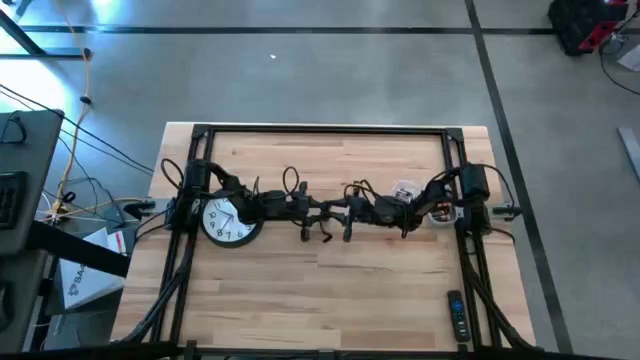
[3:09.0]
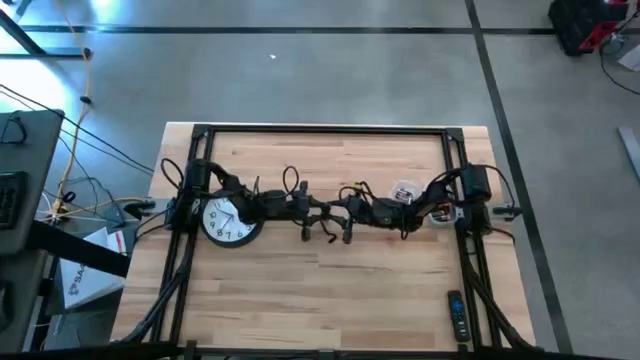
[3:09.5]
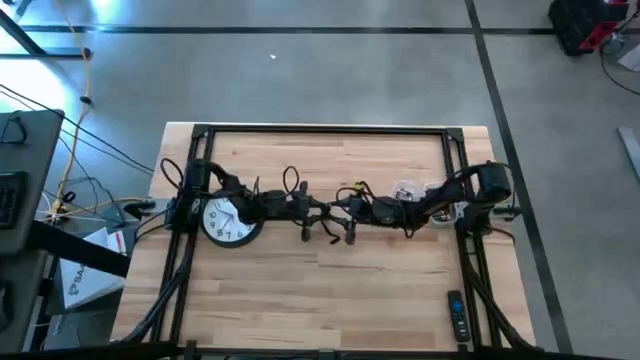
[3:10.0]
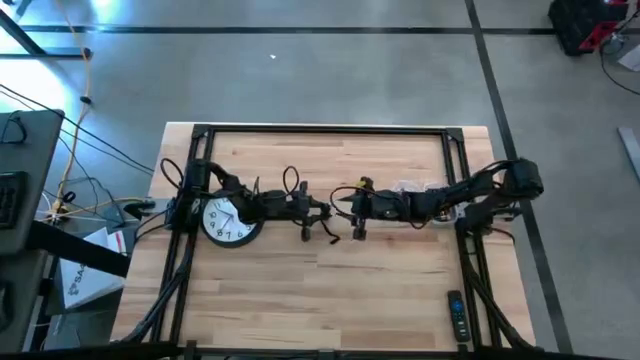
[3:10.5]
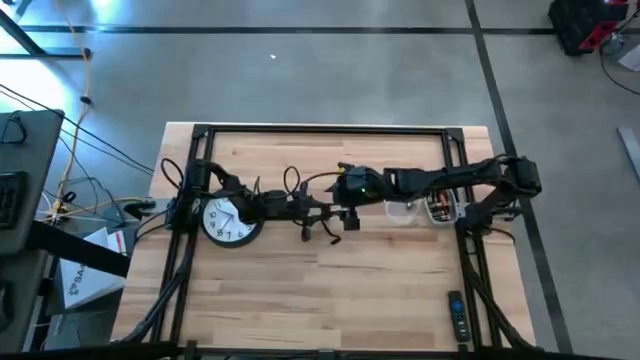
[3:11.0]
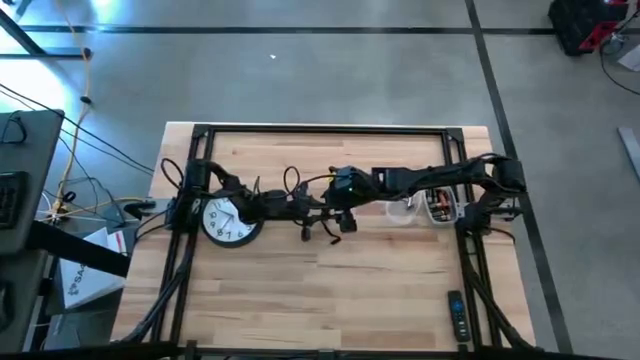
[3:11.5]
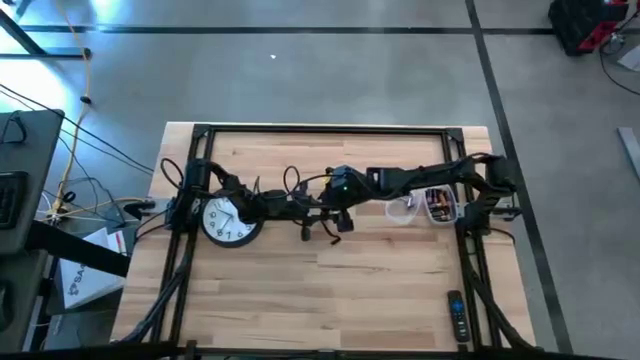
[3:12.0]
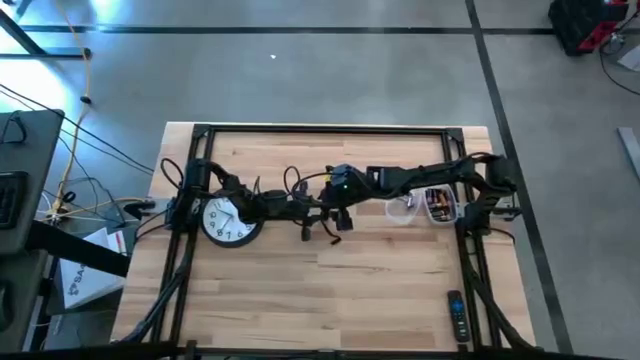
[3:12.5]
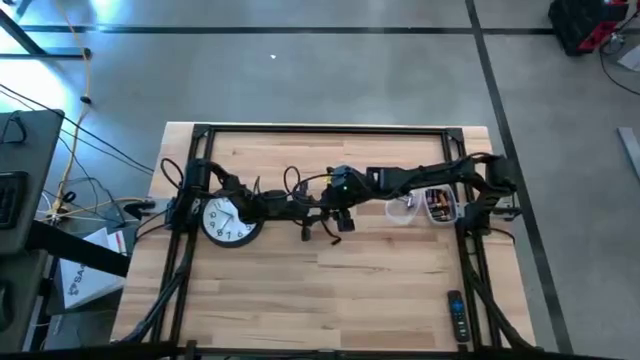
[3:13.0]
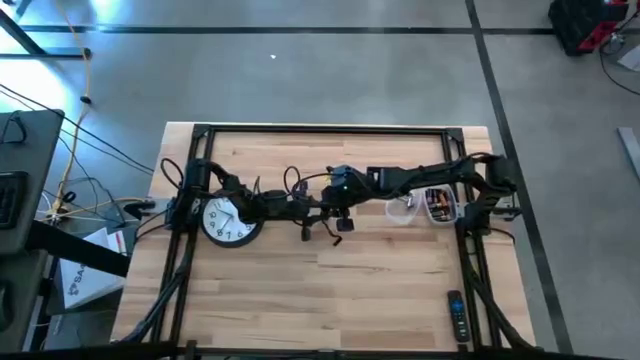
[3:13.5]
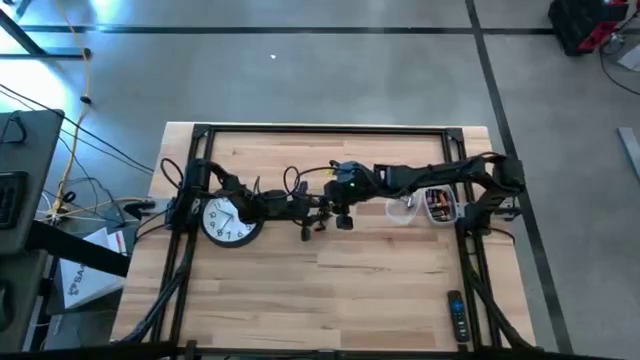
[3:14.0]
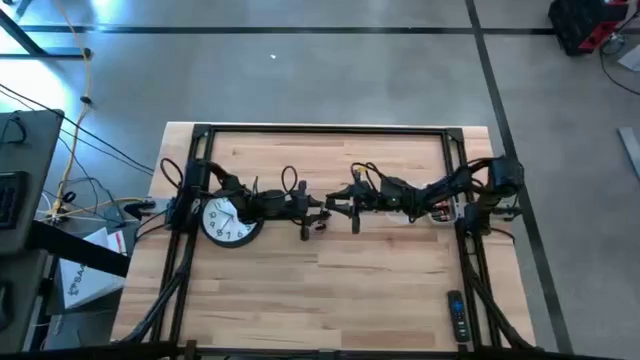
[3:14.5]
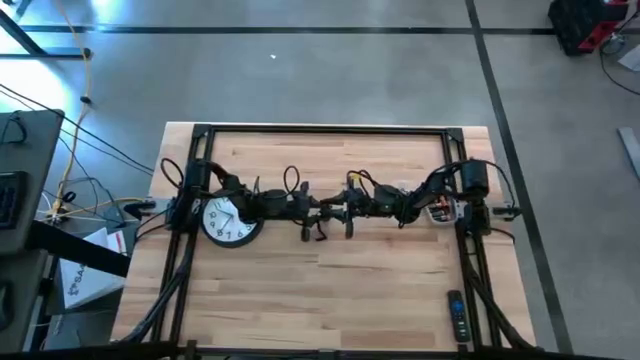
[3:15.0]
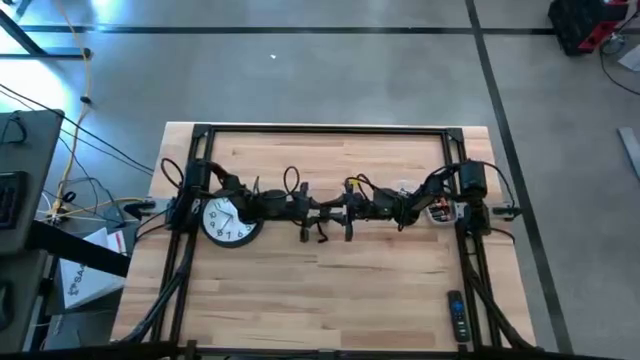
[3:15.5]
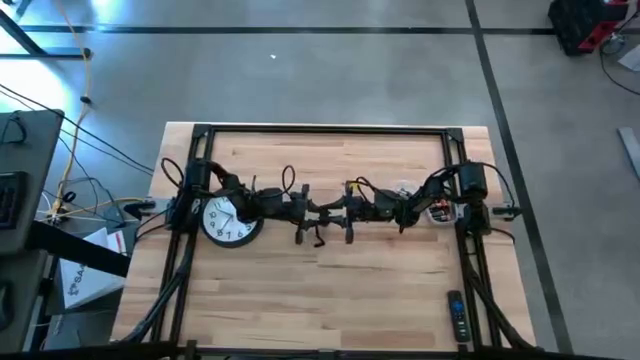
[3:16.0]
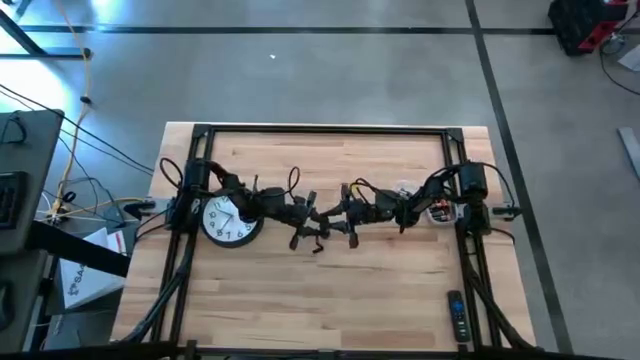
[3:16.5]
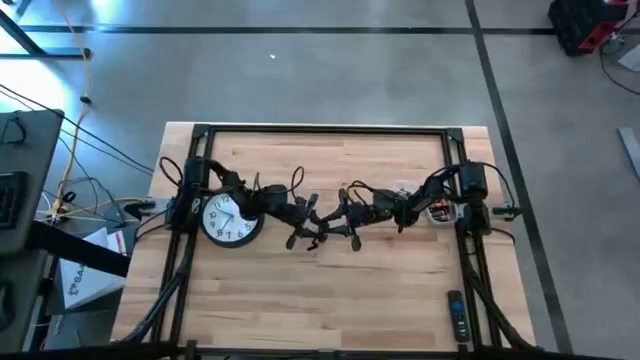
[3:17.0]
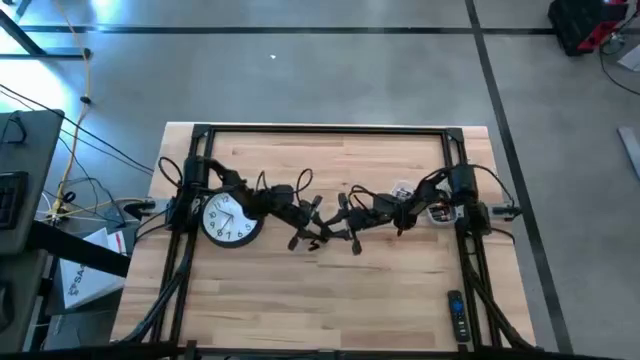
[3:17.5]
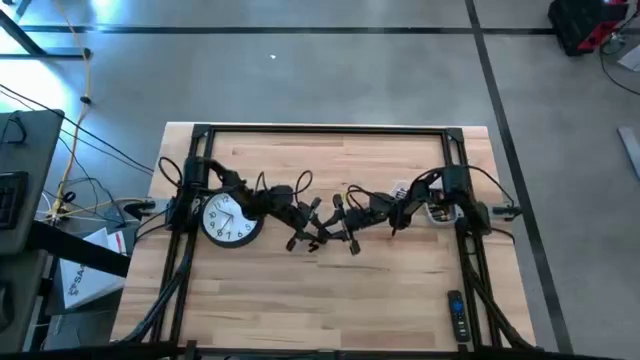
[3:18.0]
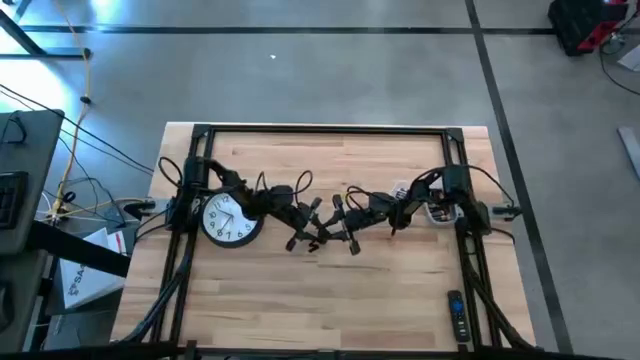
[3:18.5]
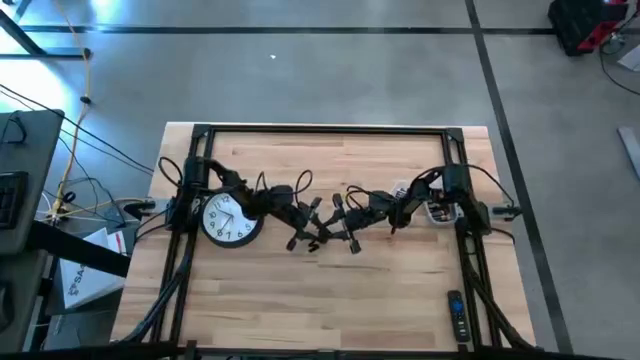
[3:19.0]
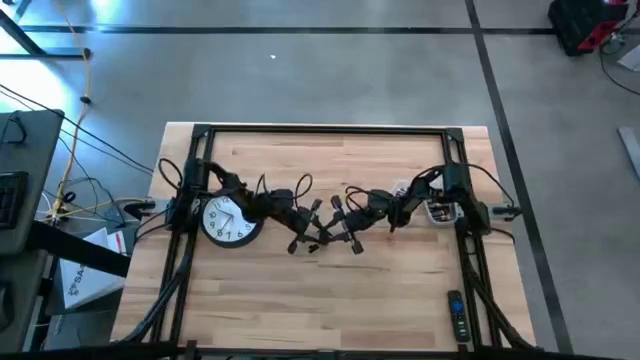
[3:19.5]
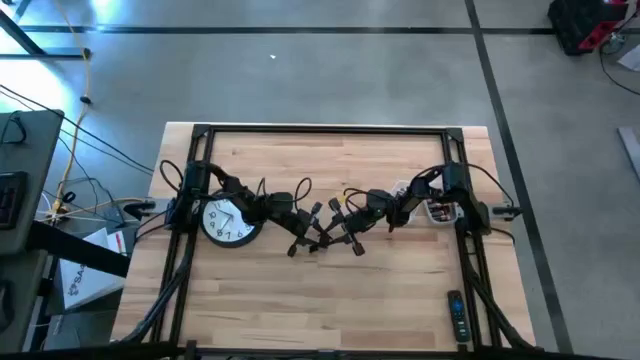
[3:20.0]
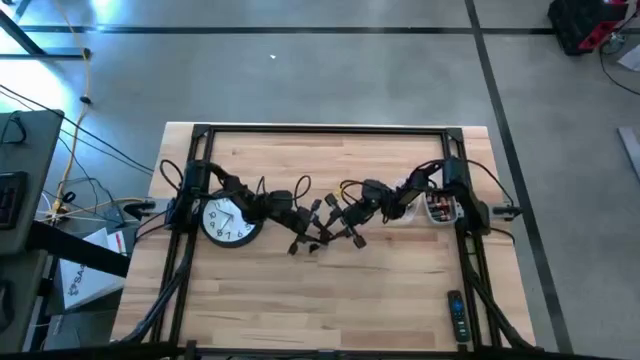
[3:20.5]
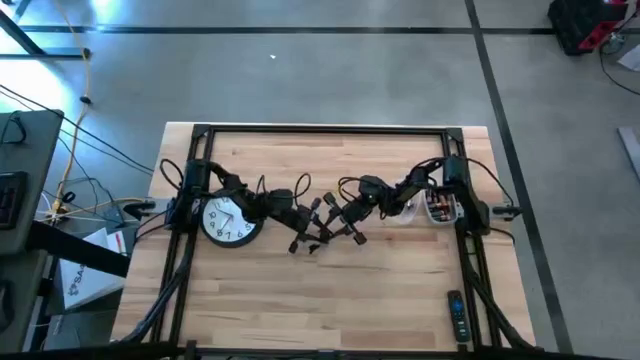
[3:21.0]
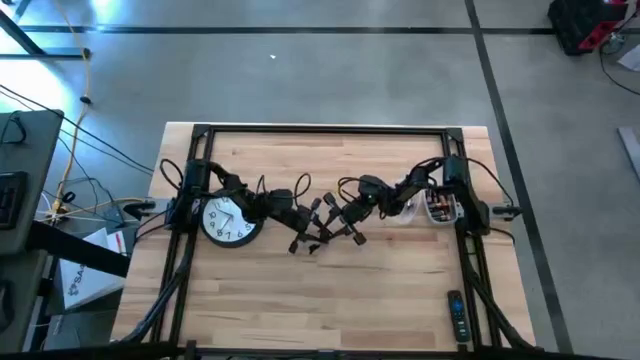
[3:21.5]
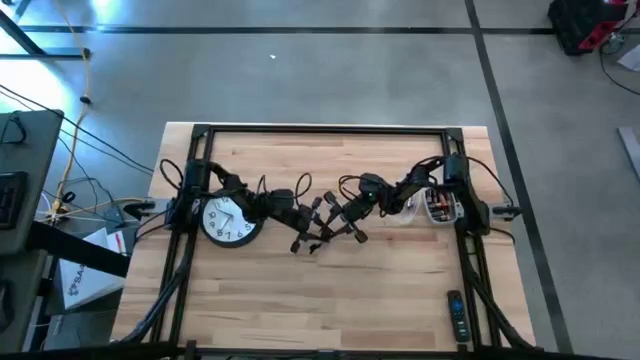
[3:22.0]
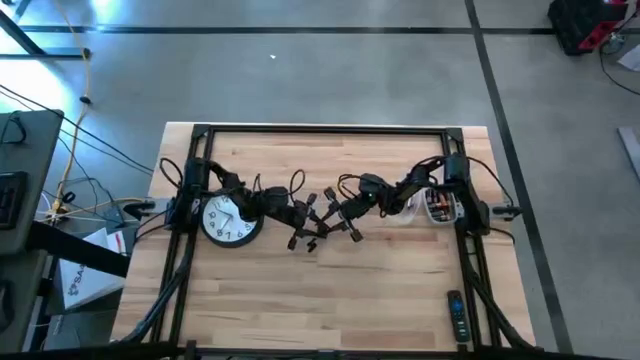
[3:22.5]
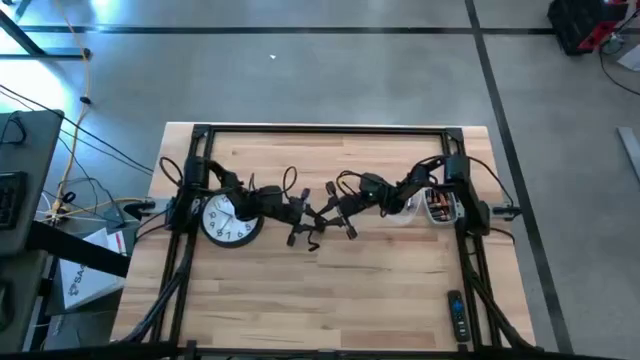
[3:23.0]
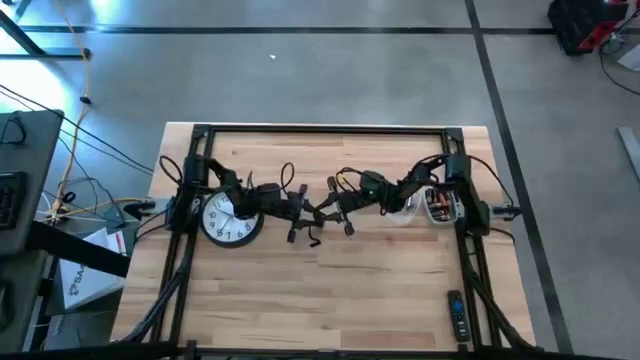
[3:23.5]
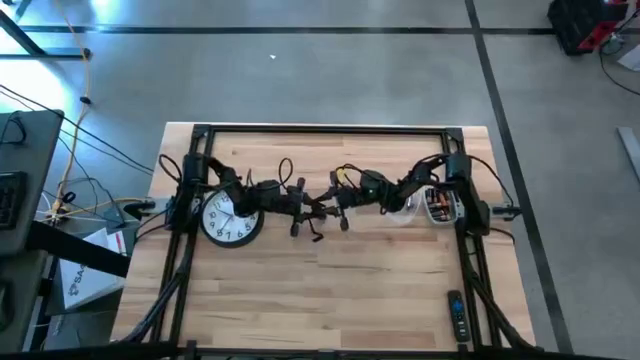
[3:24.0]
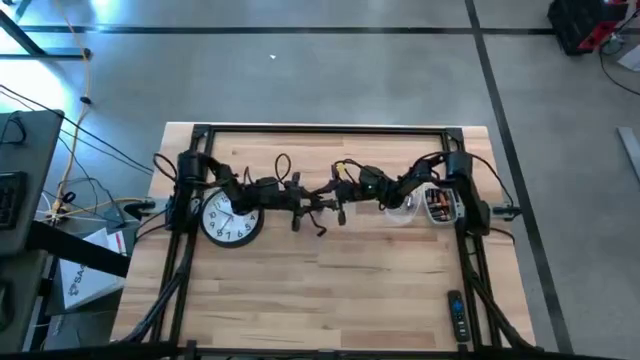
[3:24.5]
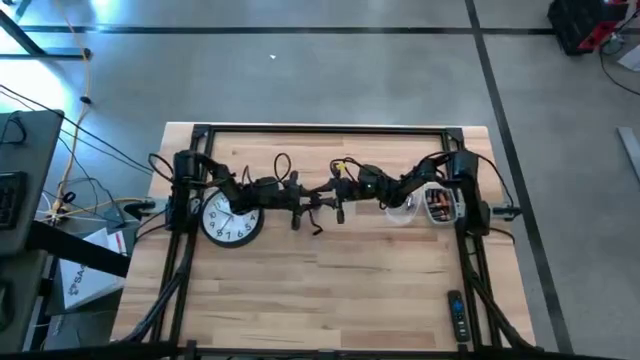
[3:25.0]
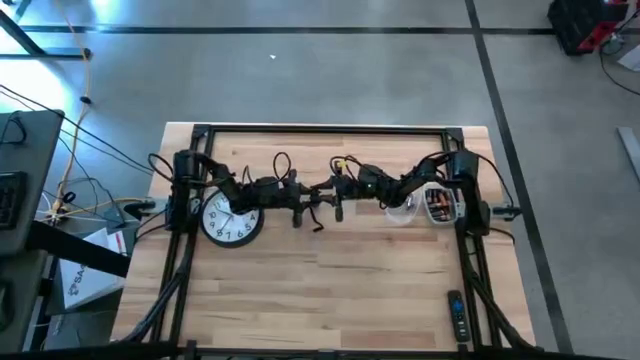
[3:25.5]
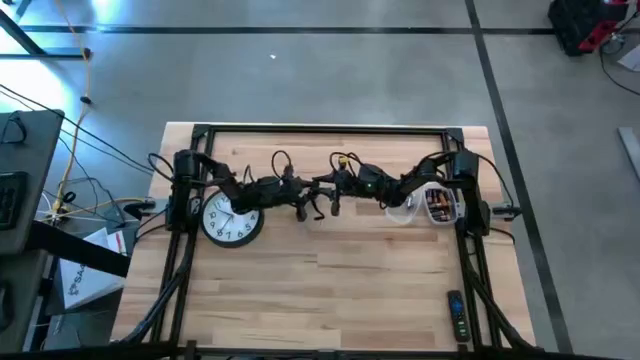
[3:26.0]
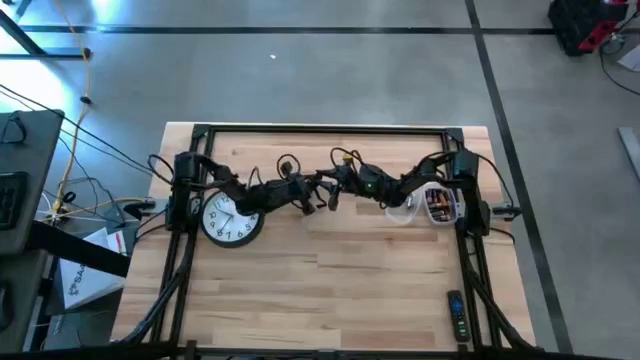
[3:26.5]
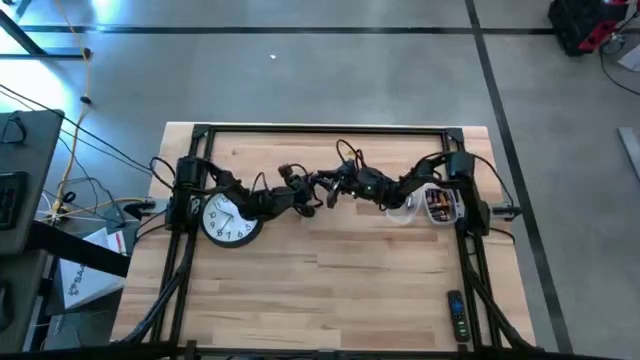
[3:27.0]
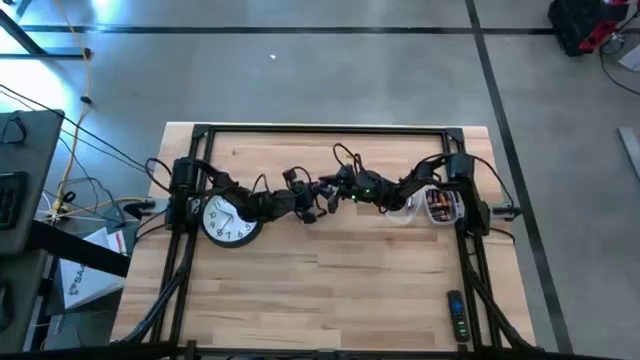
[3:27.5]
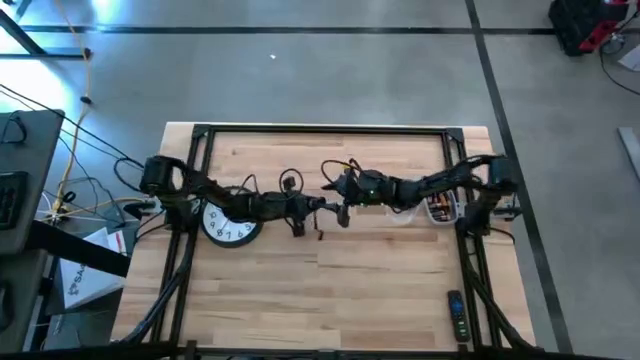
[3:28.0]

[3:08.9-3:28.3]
Task: Insert battery
Close the black flashlight lid

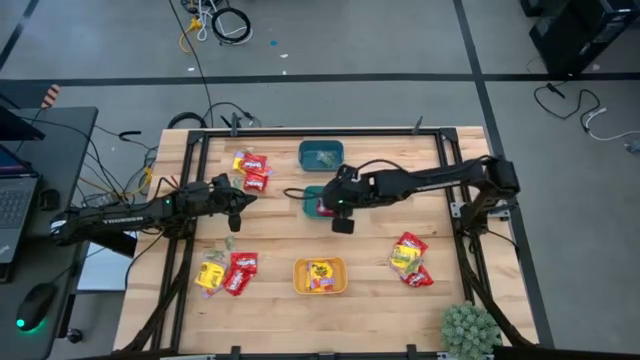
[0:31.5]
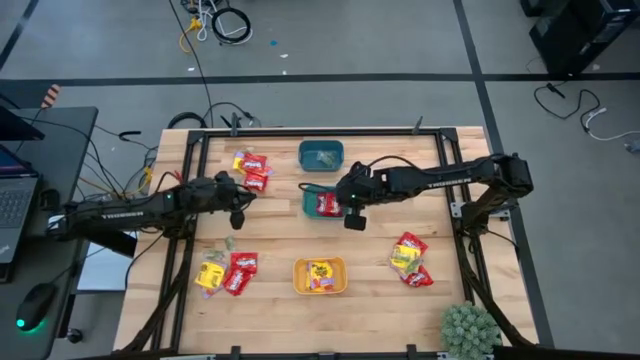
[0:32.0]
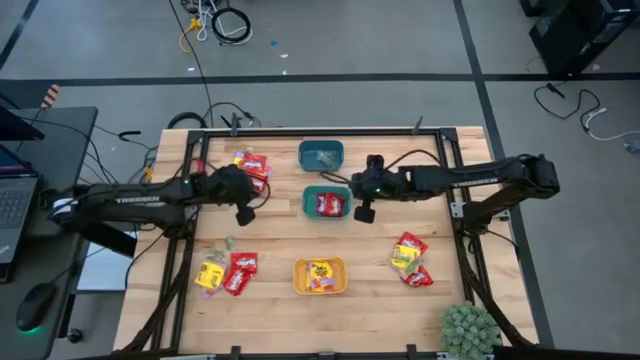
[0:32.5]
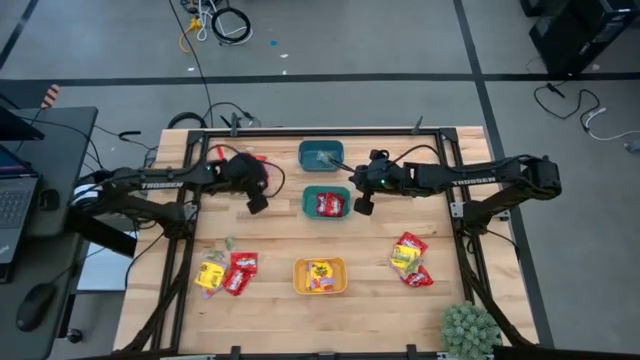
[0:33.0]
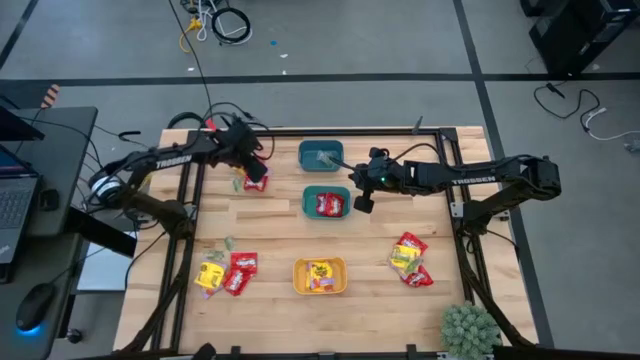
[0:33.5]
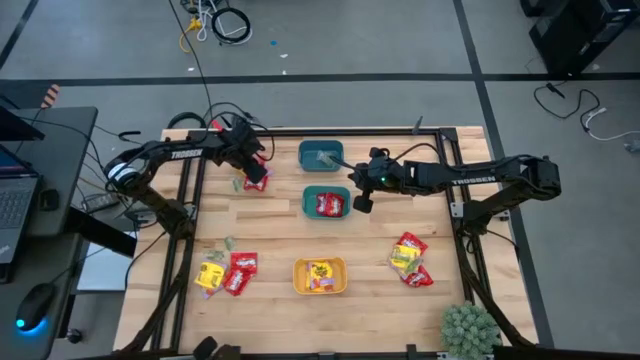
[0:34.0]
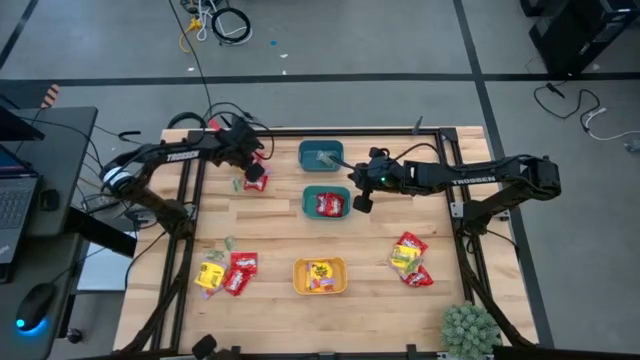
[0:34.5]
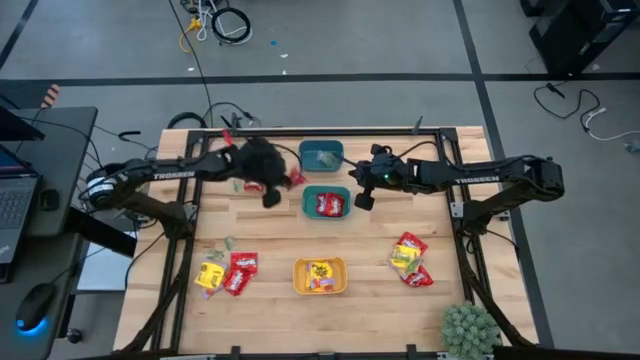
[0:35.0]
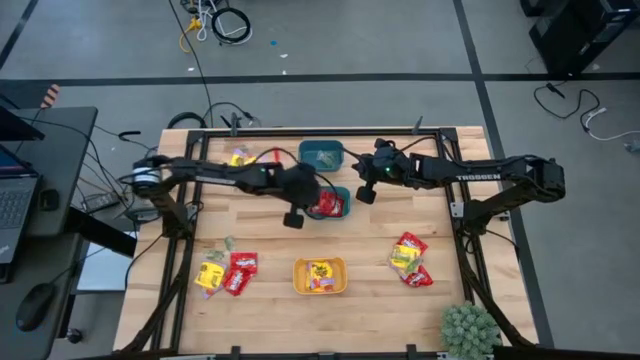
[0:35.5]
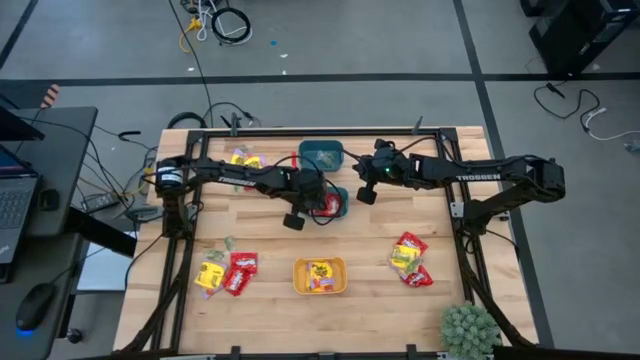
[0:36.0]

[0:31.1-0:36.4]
Task: Sort candy
Put the red candy into the green bin
